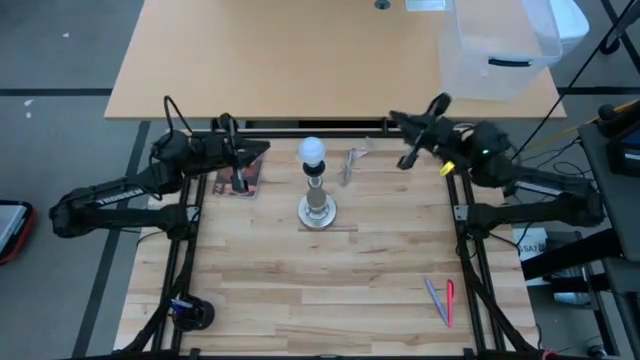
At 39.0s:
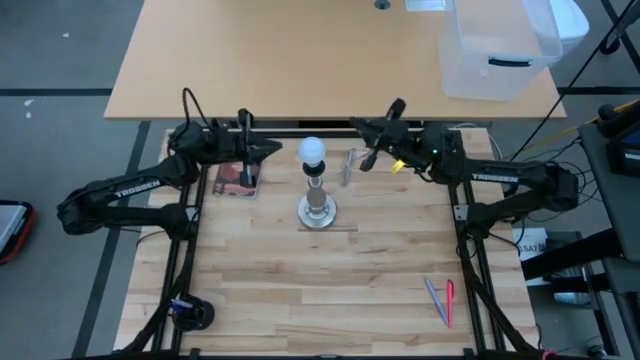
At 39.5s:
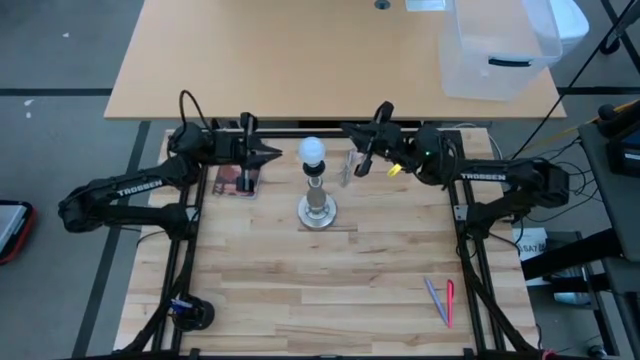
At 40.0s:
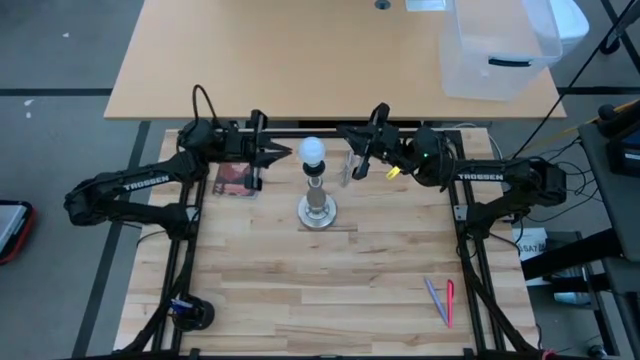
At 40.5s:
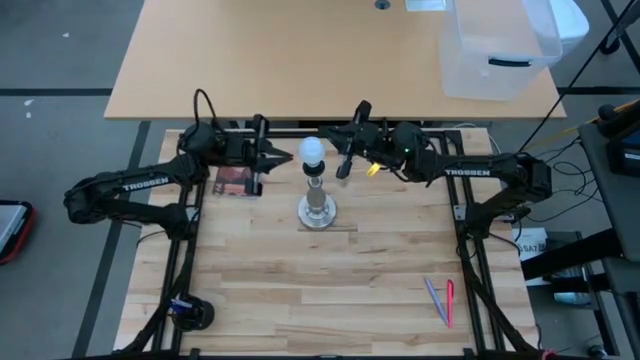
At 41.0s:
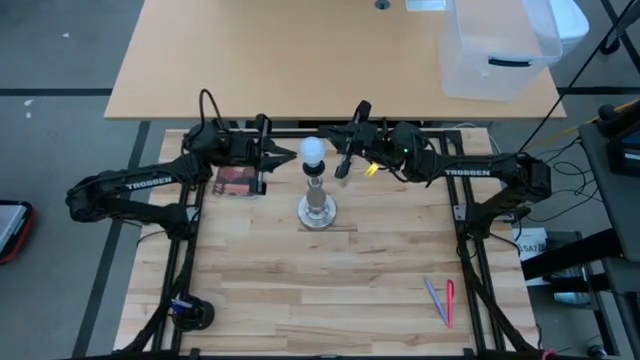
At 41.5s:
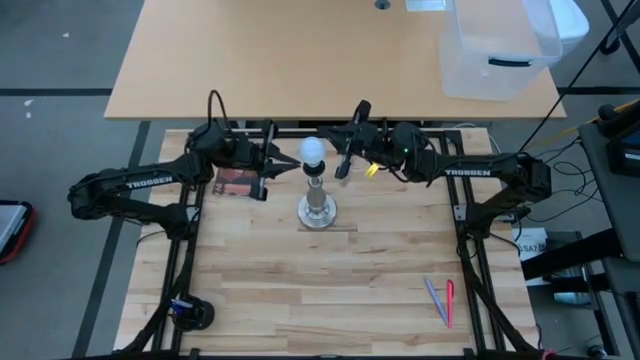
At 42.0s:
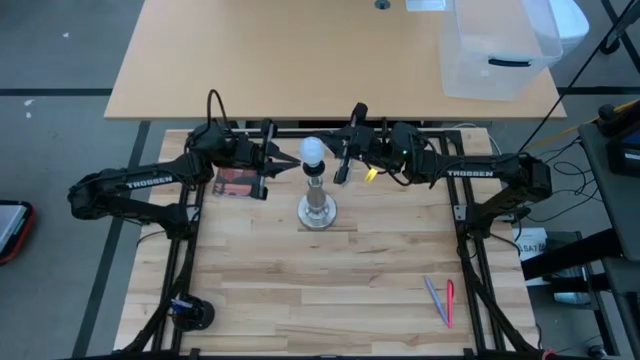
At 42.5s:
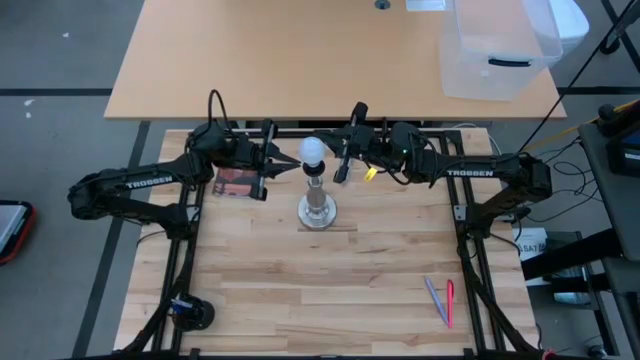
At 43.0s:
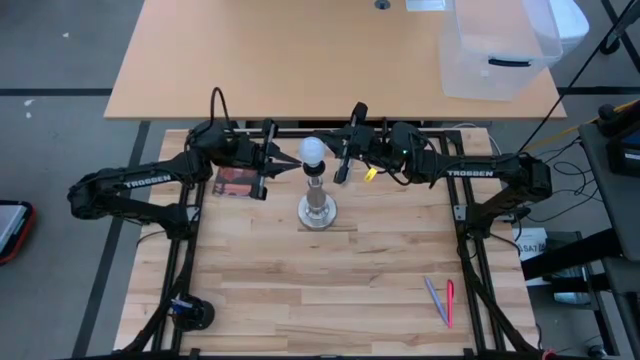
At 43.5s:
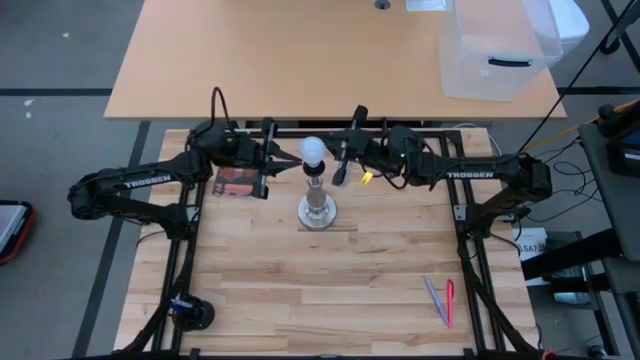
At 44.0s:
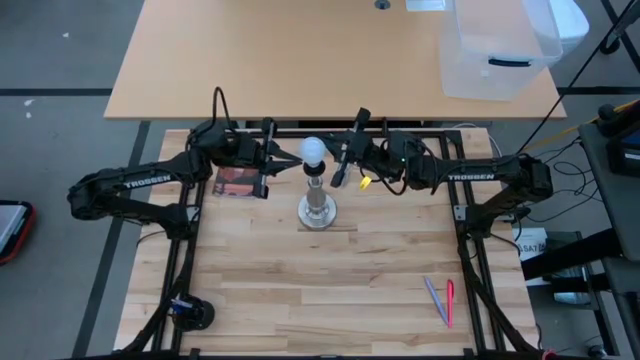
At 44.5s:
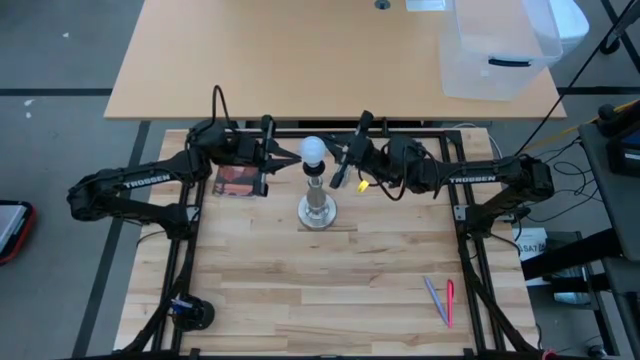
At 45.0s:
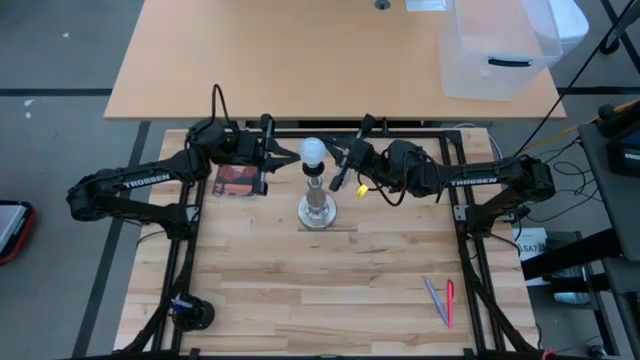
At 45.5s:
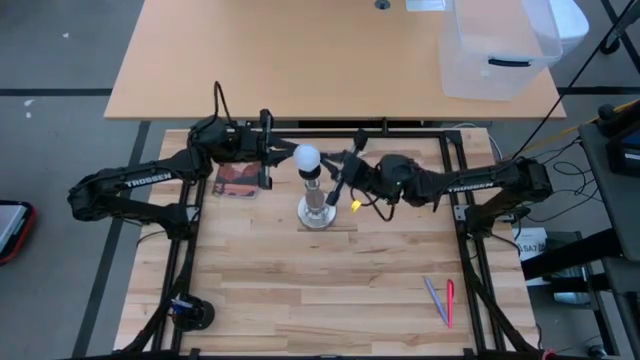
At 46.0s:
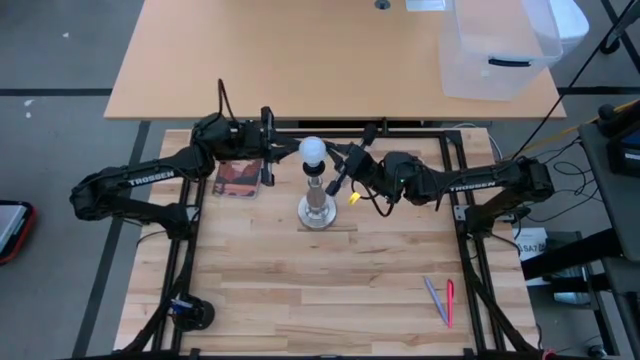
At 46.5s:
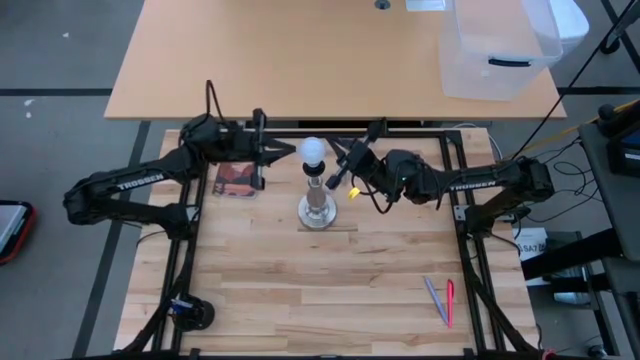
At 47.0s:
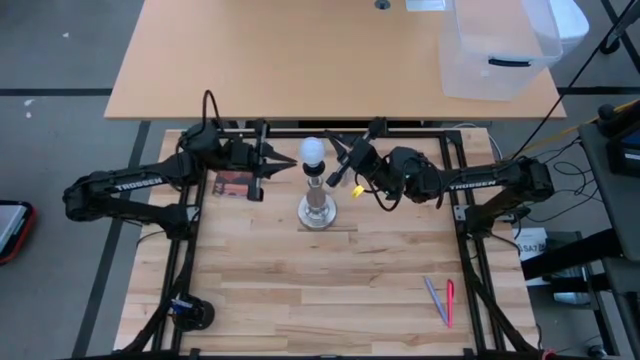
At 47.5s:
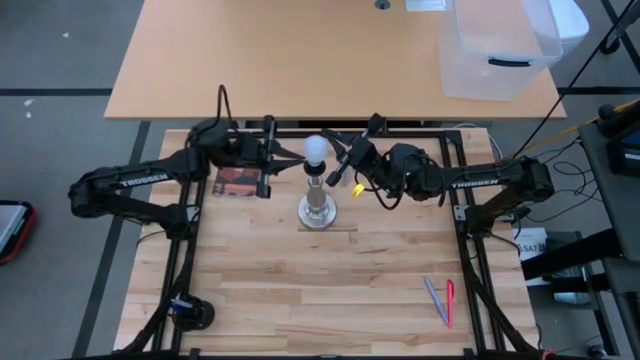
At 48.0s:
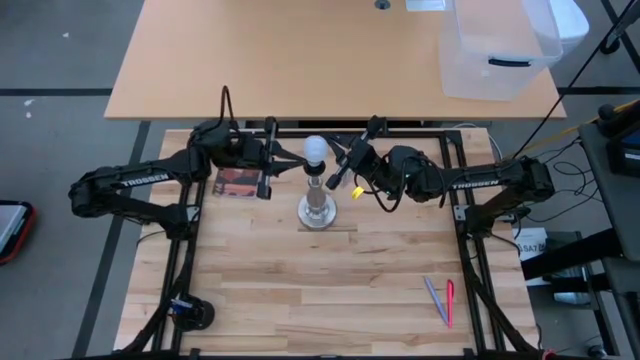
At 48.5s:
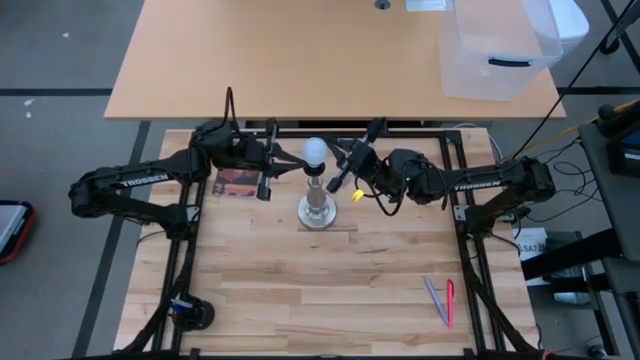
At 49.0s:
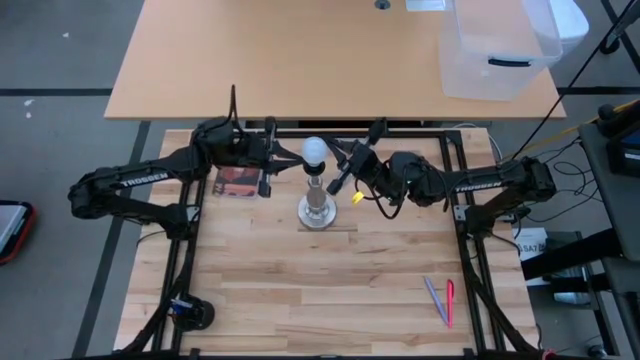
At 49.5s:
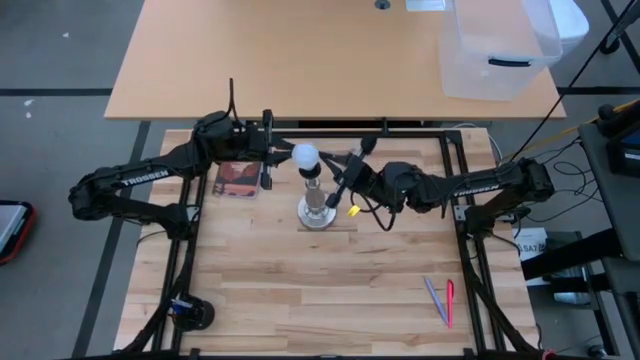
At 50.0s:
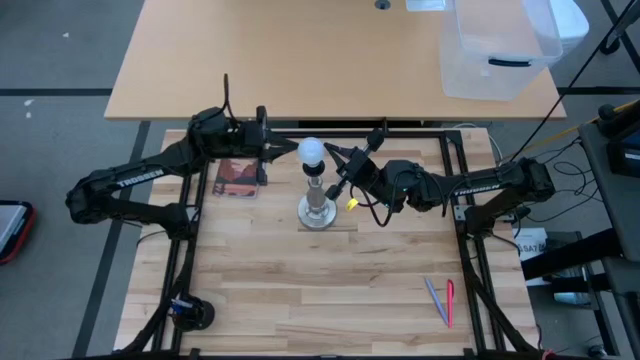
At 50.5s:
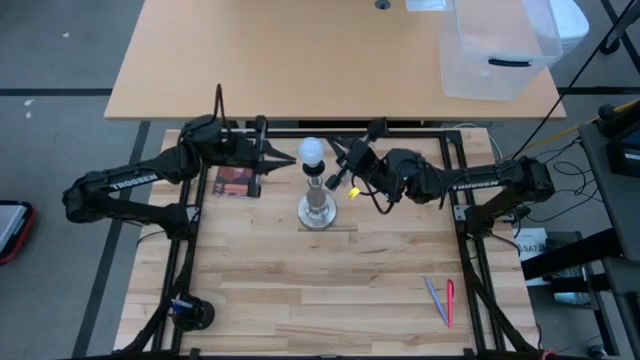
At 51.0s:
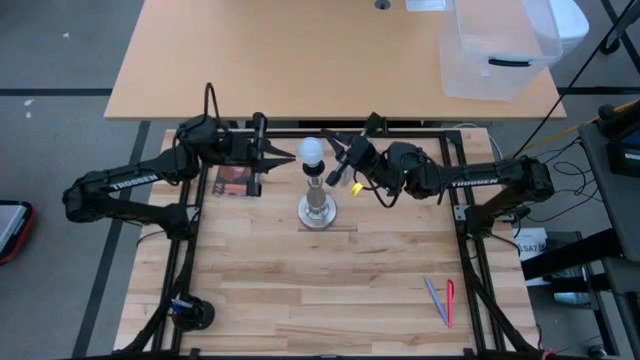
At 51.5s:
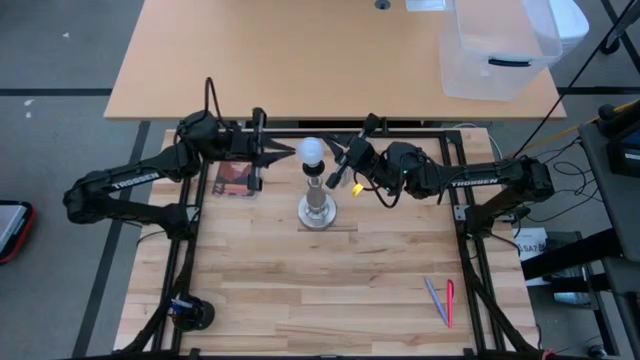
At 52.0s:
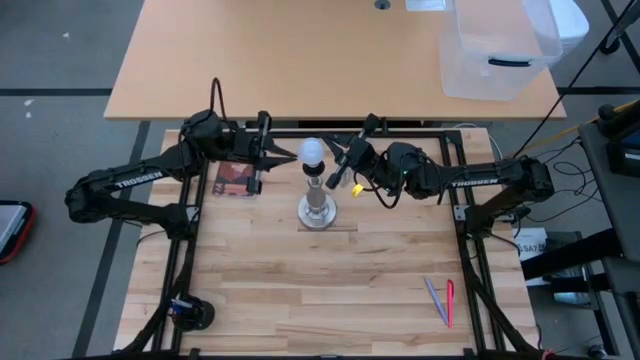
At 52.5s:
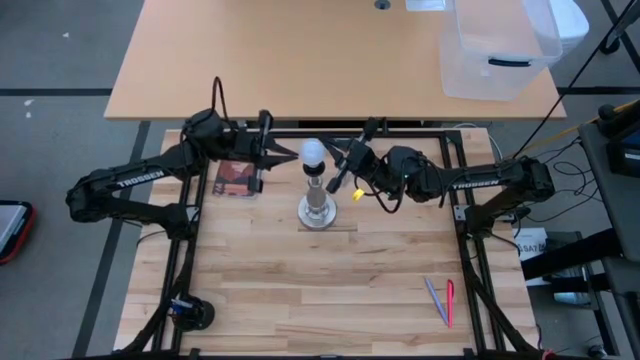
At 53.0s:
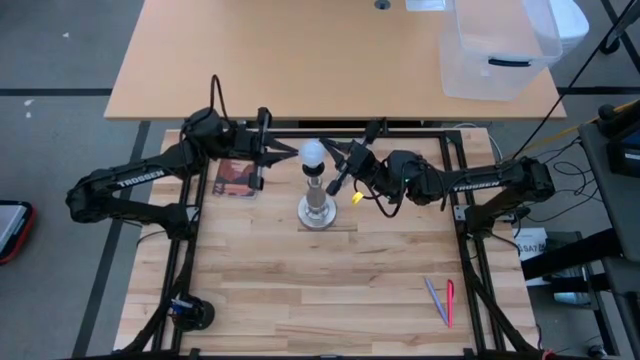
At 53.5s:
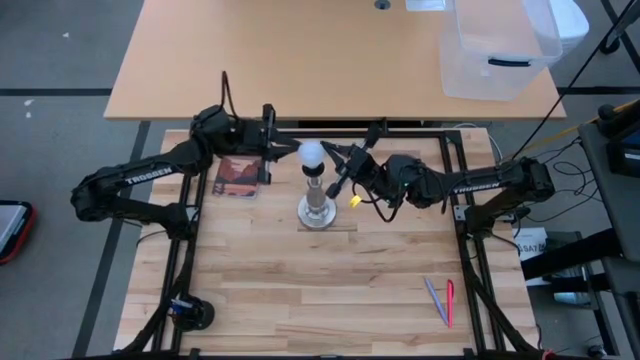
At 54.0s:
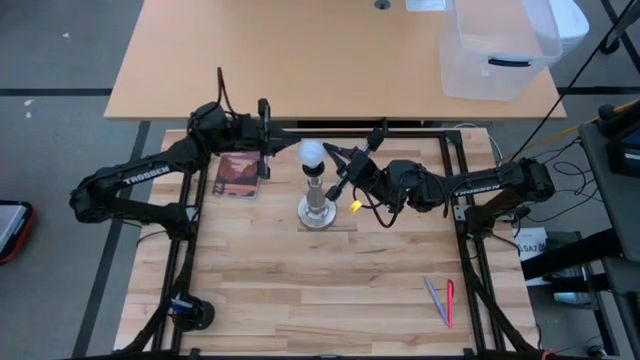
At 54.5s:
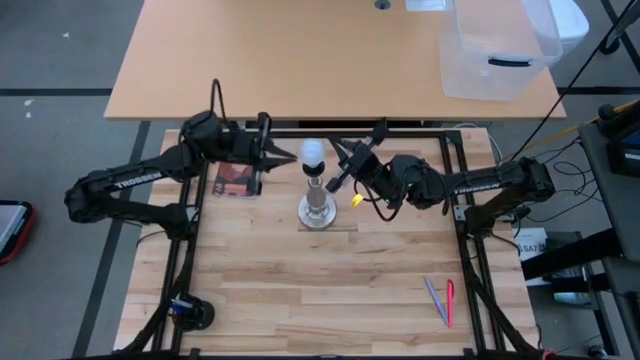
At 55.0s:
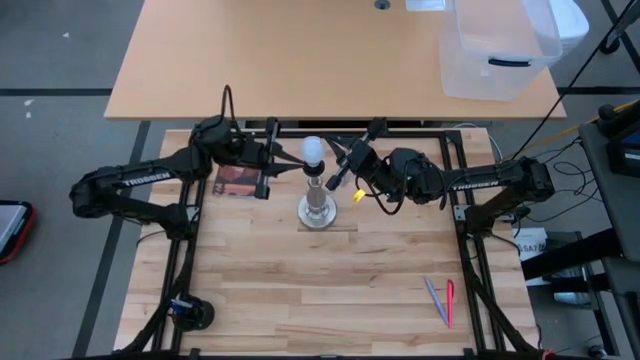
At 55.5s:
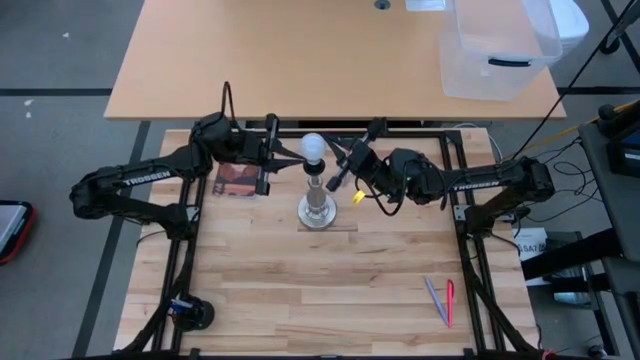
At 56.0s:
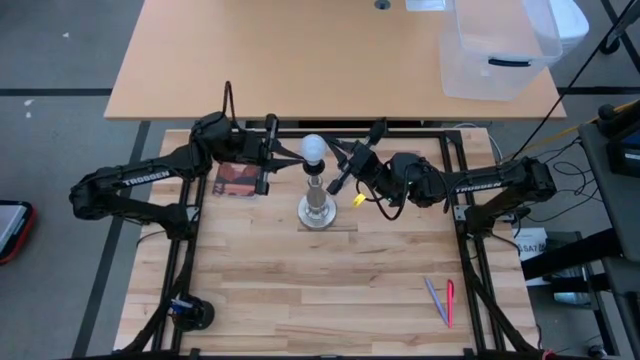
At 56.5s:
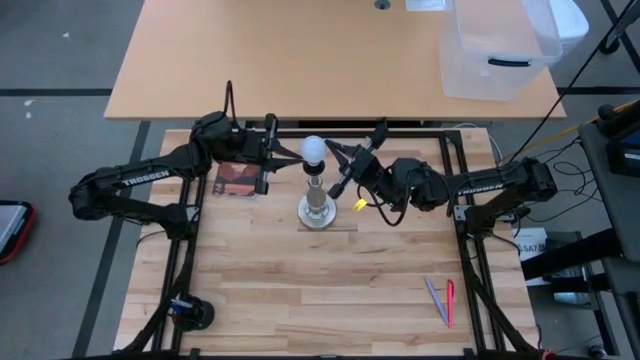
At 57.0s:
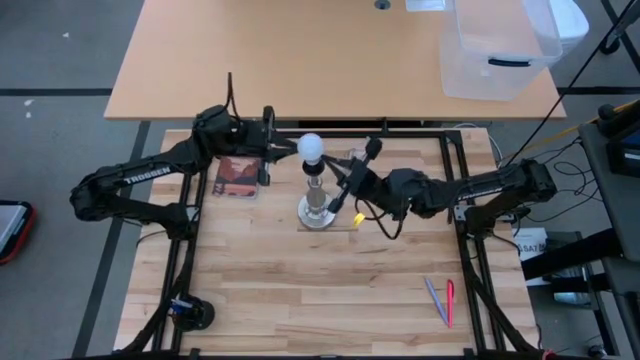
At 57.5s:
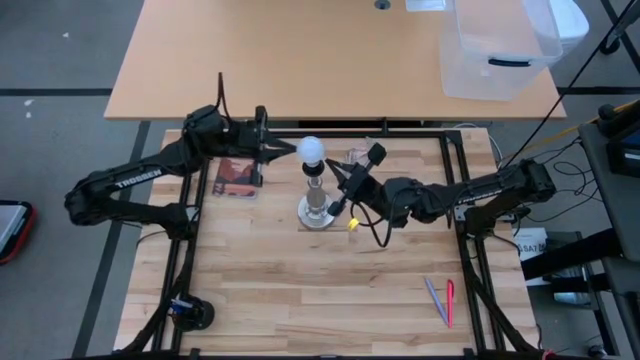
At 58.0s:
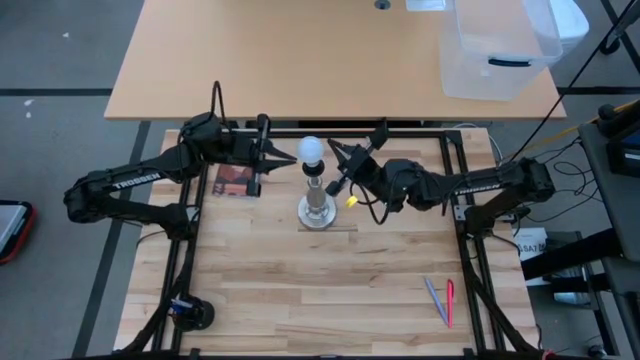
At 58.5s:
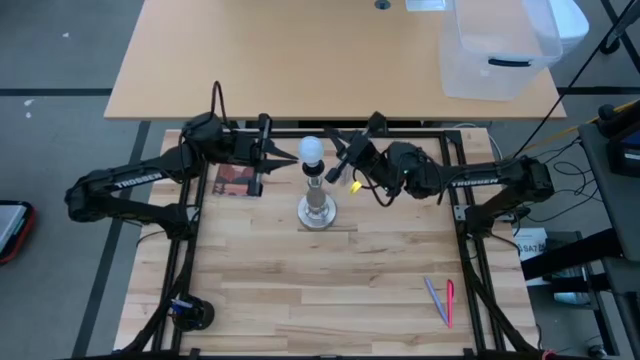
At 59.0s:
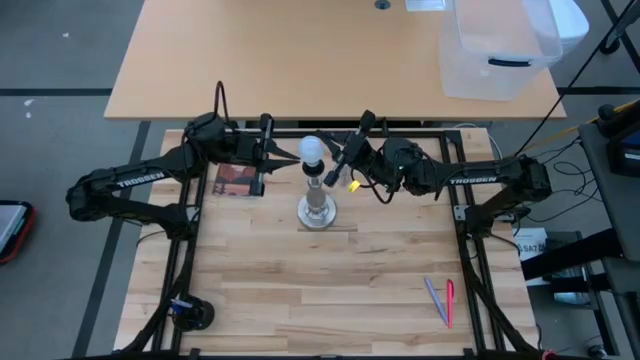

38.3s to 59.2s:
Task: Screw lightbulb
Insert the white lightbulb into the silver lamp
